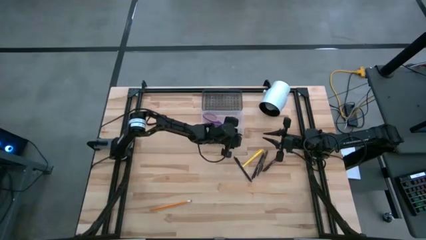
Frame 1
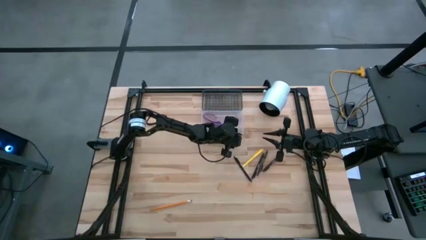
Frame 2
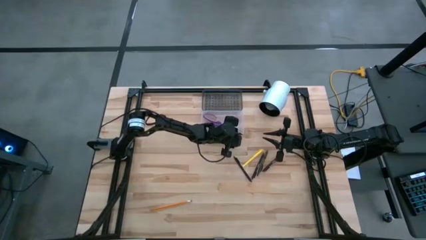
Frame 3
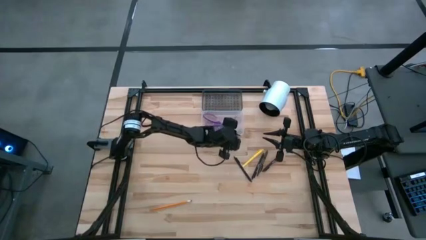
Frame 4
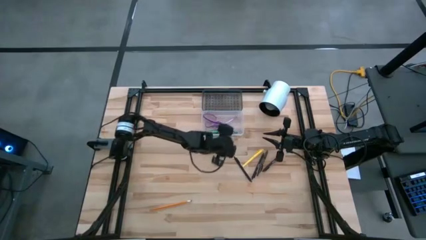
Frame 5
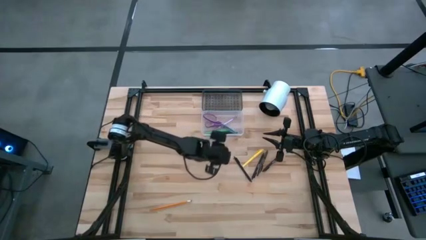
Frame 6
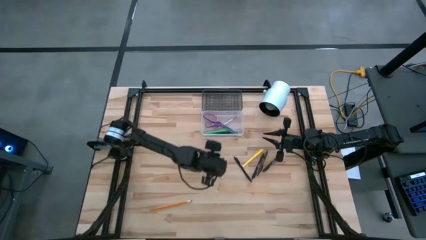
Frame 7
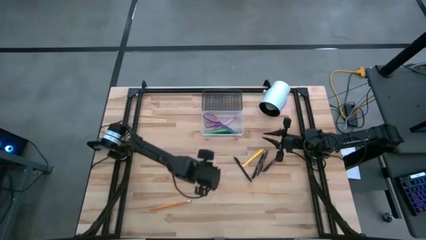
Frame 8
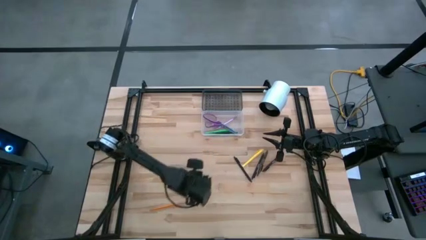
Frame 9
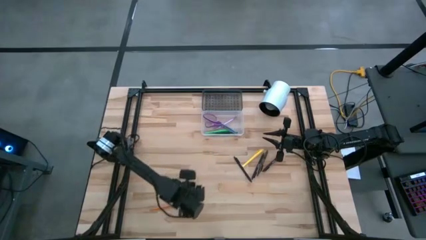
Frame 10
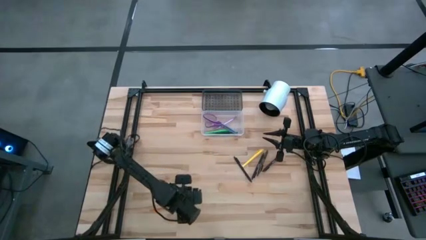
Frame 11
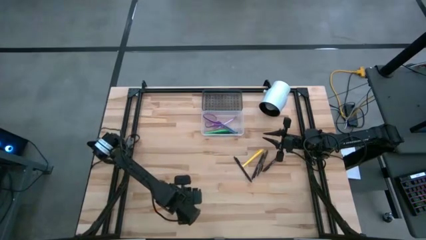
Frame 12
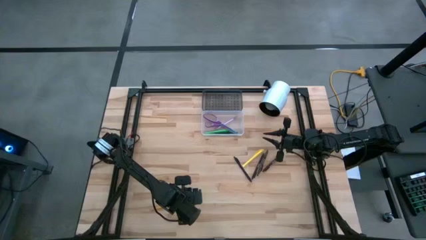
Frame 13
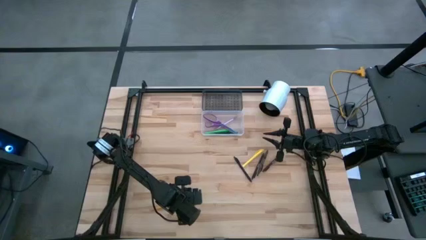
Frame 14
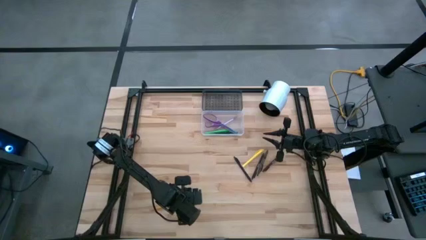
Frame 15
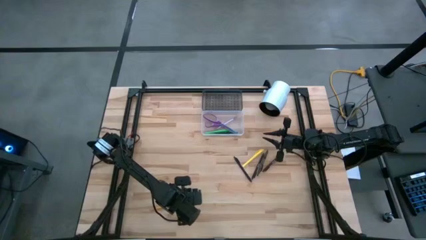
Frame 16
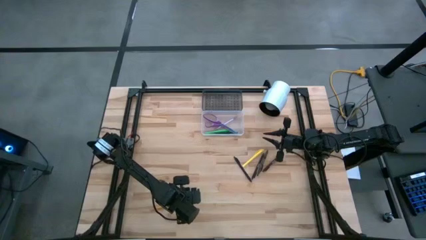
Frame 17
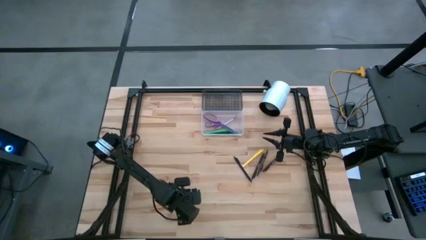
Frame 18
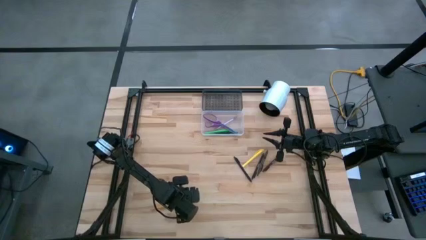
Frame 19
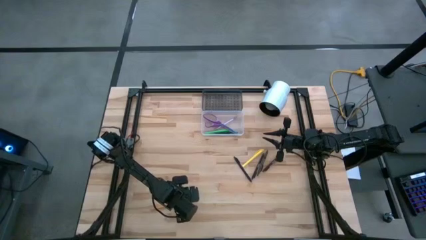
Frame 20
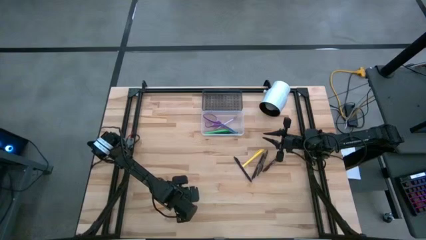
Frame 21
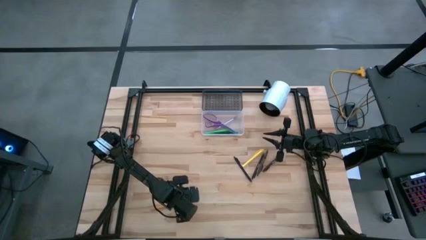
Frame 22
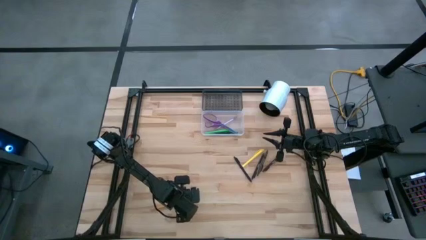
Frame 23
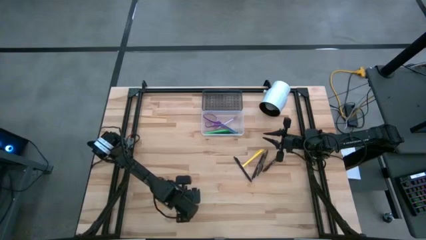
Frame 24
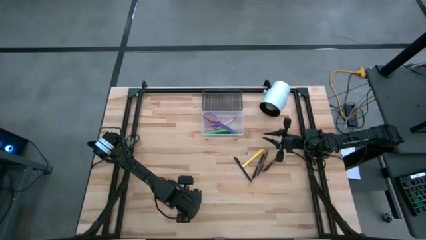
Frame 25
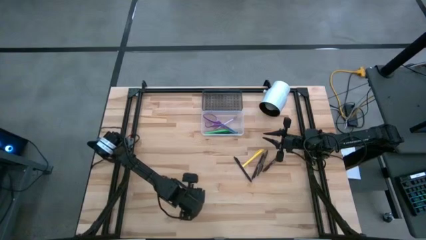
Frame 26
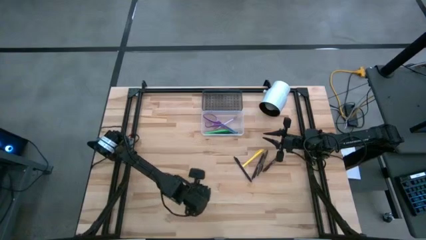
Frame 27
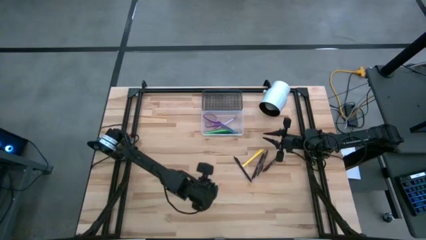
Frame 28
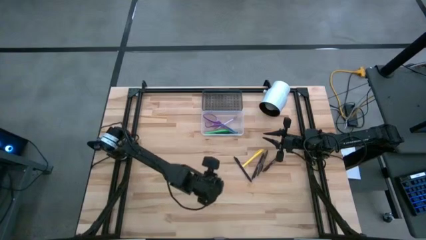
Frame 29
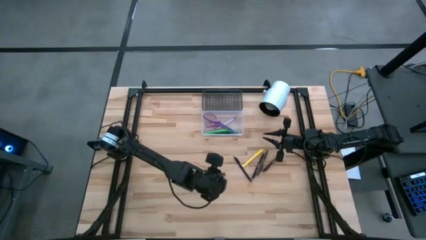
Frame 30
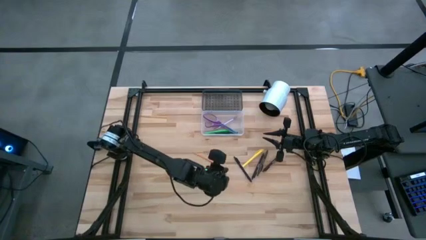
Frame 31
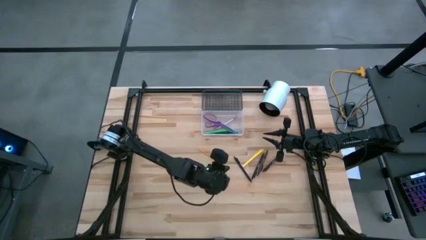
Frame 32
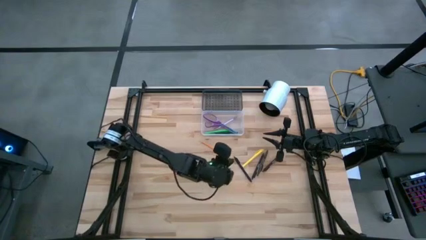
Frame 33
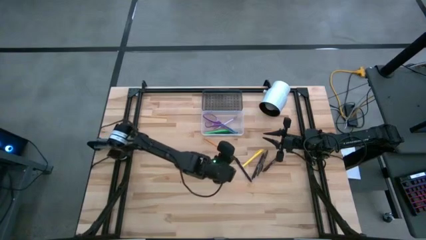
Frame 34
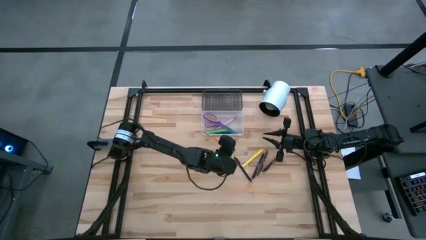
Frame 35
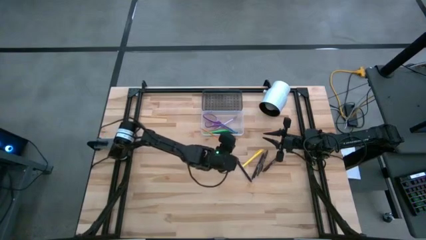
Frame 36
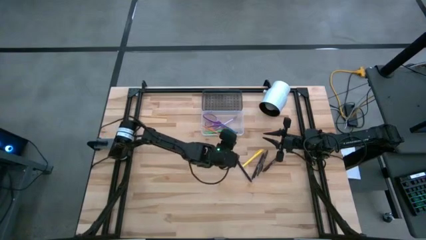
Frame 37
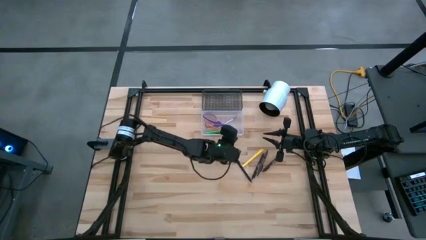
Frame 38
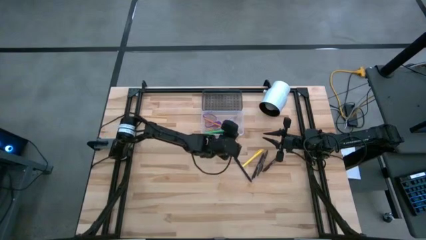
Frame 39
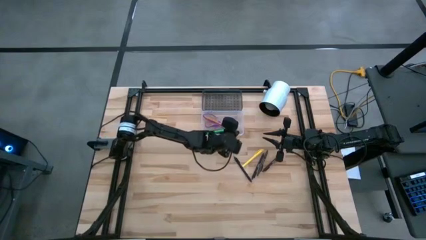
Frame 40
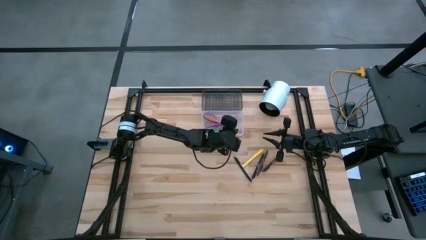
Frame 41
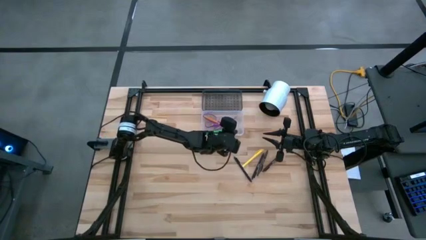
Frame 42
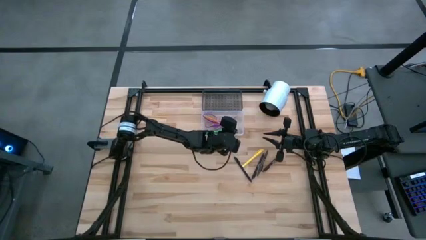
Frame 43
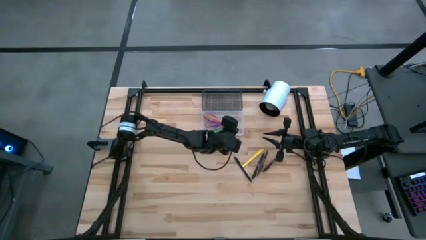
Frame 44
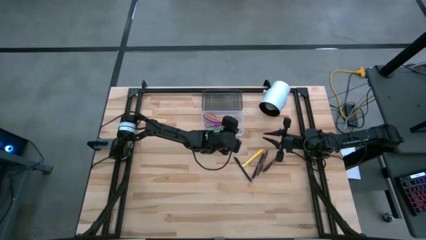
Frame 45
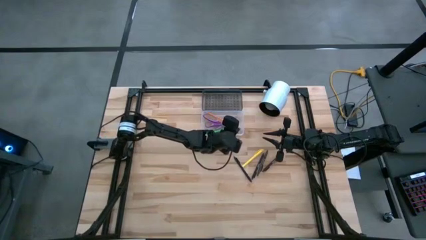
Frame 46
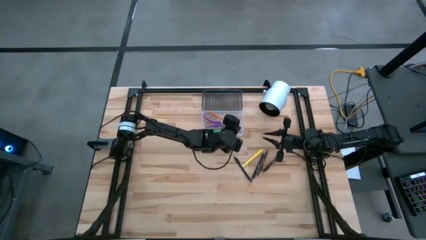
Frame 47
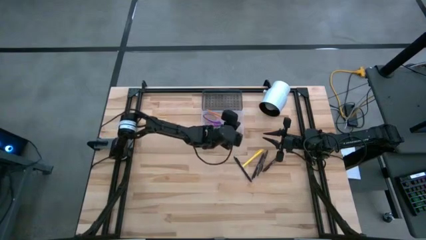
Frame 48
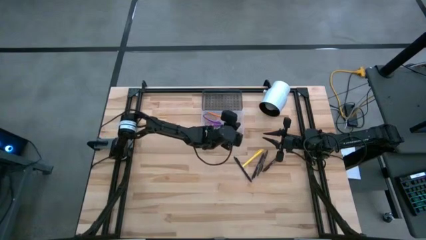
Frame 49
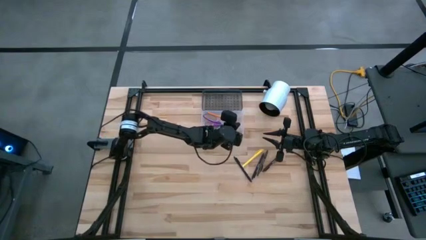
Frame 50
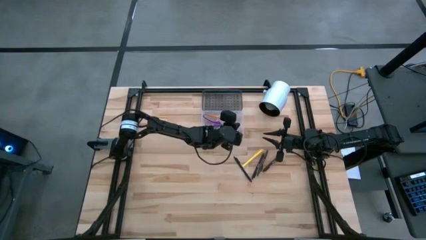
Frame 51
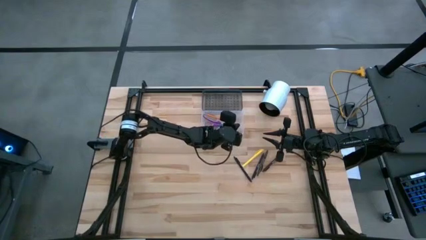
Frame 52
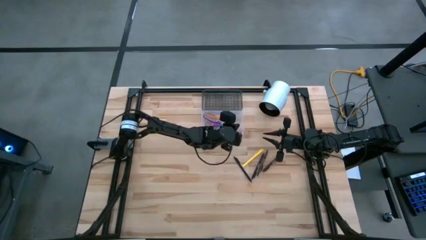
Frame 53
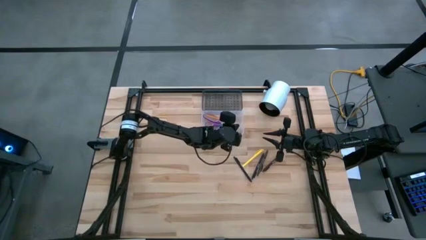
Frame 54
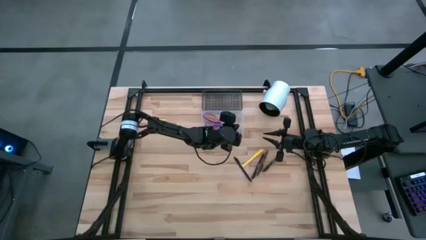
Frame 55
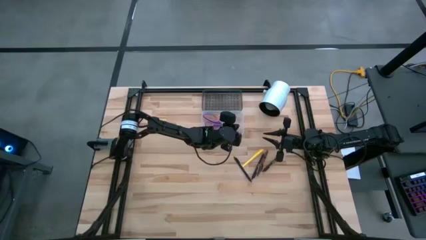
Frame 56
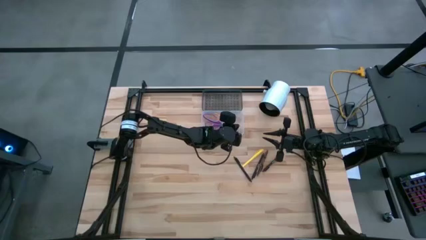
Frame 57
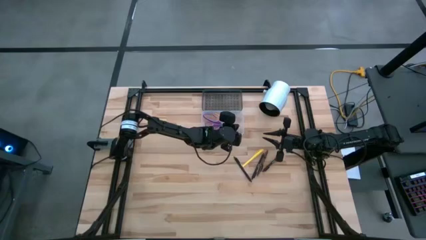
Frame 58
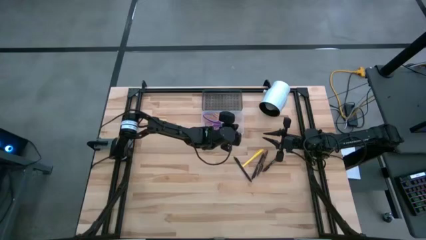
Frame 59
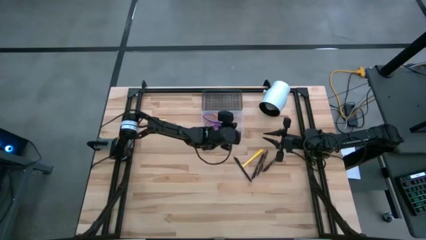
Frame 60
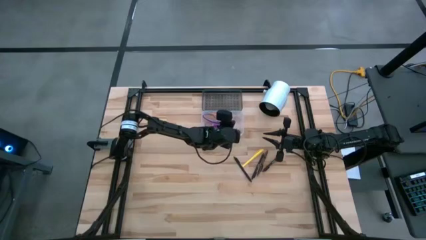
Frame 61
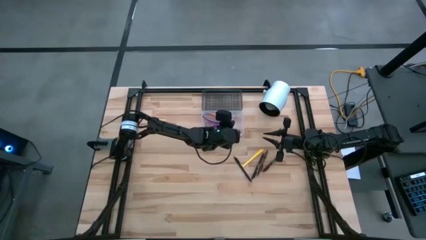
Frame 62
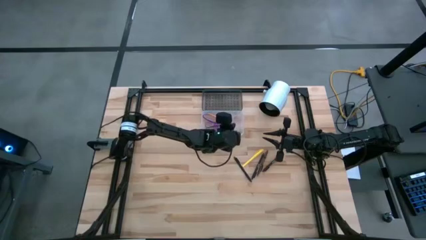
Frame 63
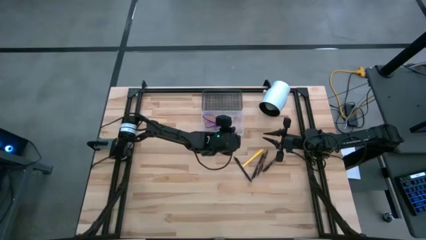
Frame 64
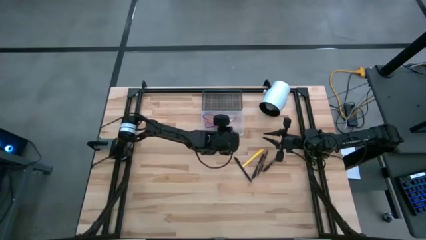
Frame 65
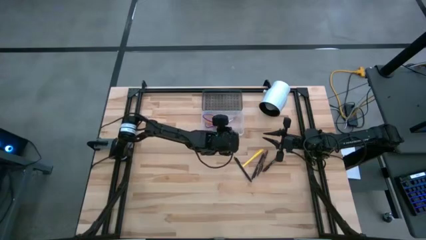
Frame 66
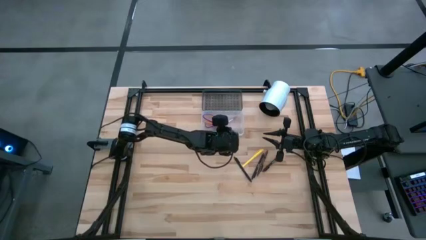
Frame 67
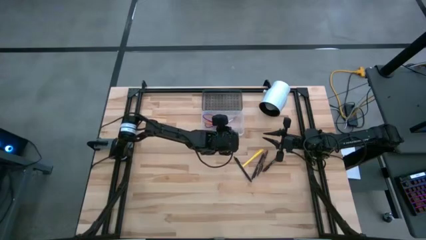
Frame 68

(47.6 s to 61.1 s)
Task: Pick & place school supplies into a supply box
Put the yellow pencil into the black box

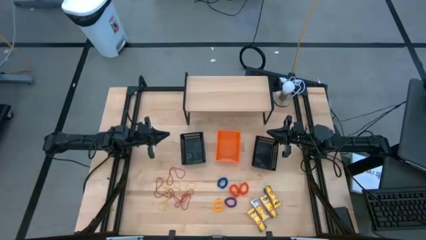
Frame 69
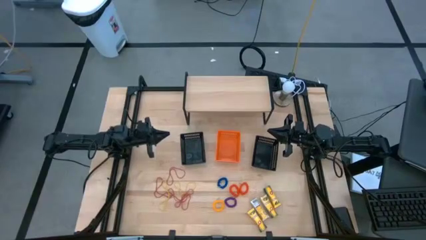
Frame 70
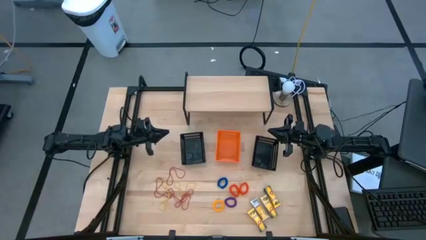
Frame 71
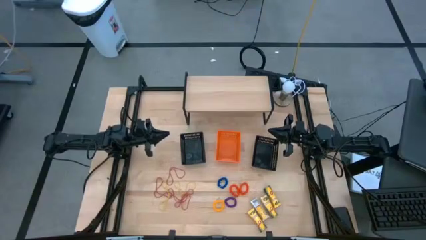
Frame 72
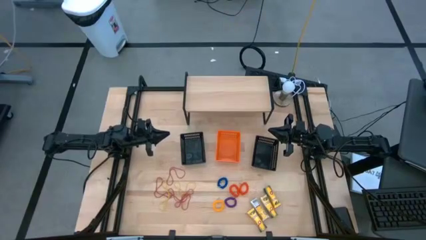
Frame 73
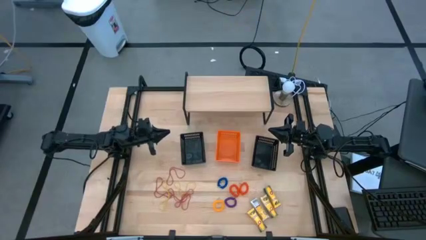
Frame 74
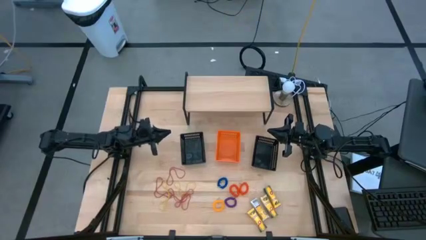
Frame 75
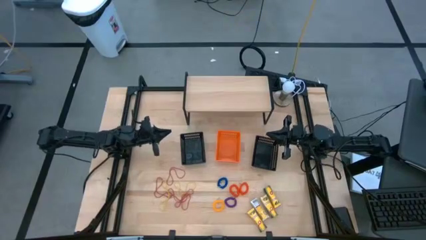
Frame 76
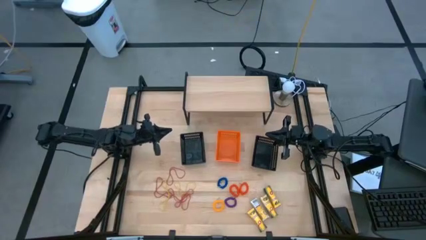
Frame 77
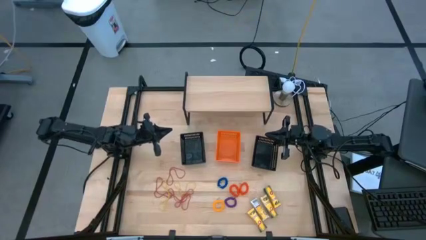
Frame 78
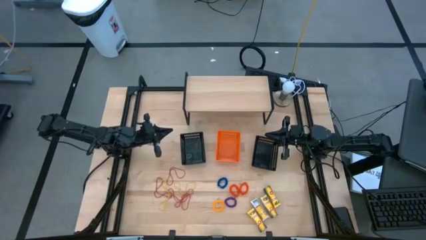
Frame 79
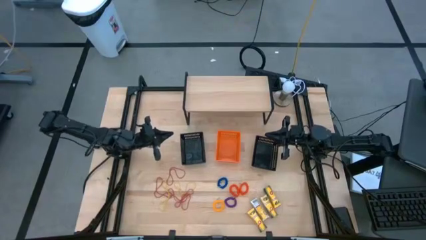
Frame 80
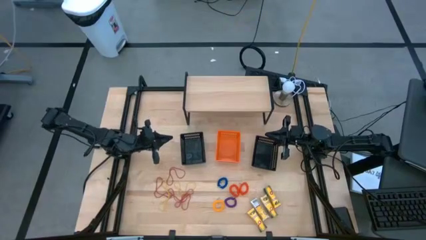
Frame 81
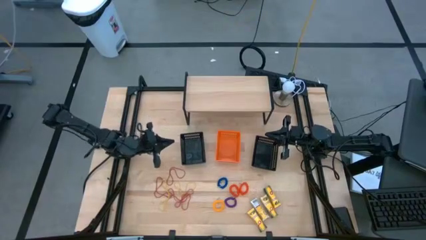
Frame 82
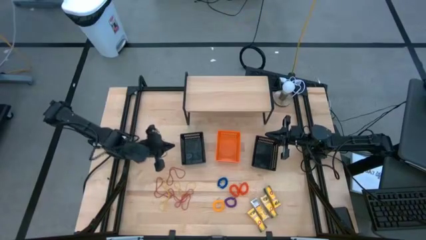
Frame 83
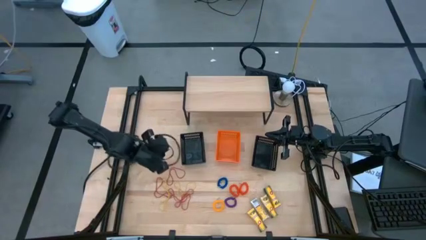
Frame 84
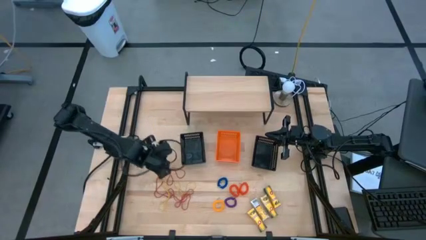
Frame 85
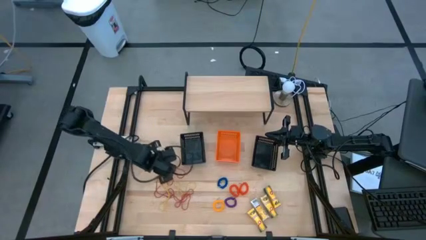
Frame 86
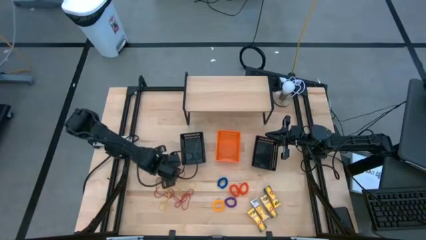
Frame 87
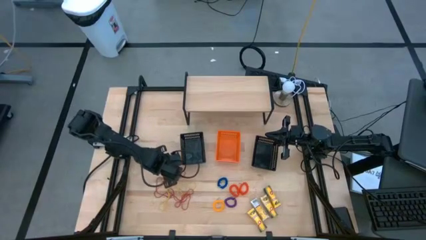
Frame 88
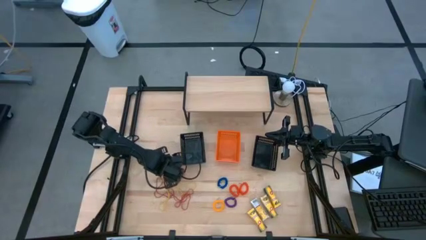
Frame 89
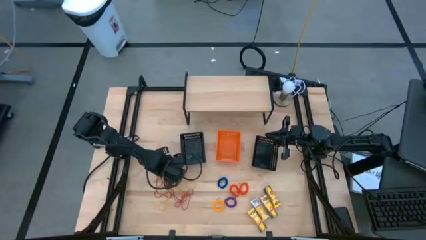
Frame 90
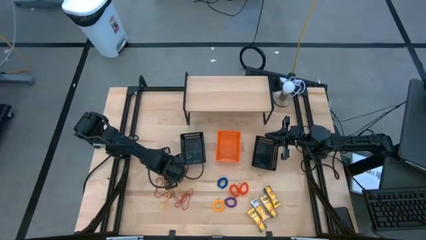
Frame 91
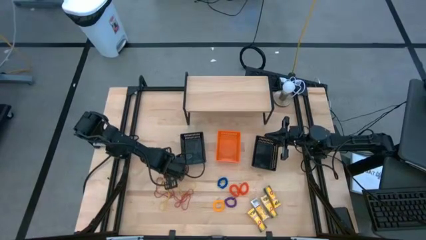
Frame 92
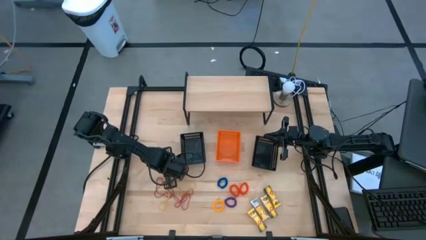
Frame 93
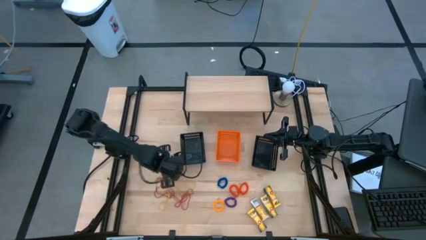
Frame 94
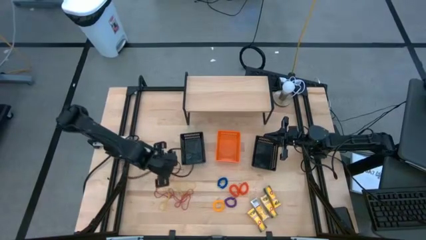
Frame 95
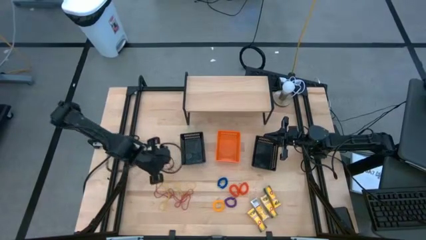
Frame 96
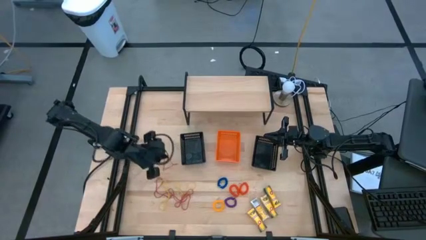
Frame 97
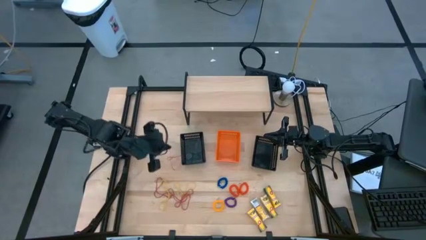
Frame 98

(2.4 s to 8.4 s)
Task: Pick & Place Office Desk Supplies
Put the red rubber band into the left black bin
